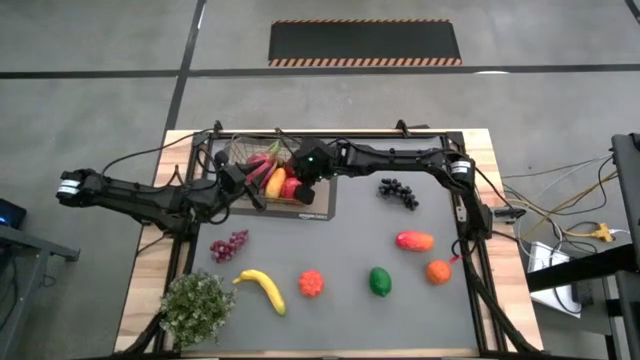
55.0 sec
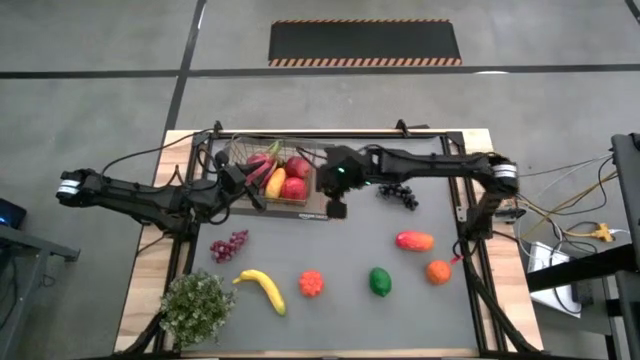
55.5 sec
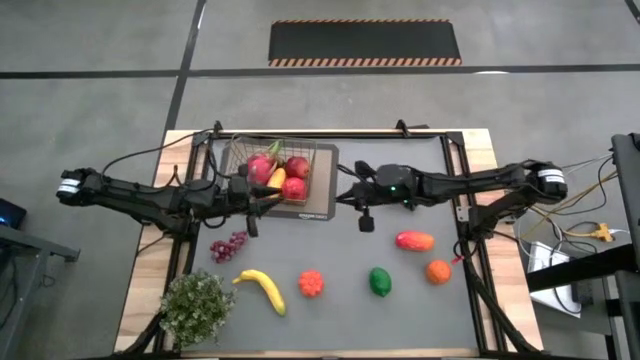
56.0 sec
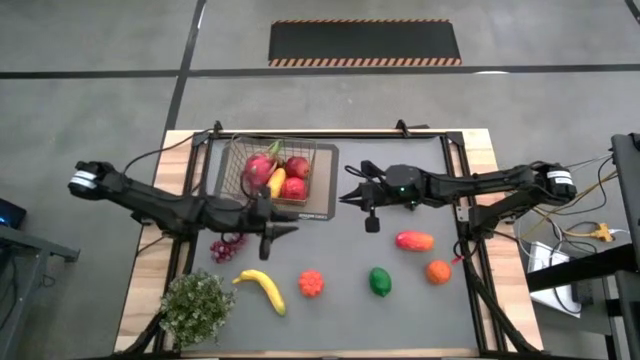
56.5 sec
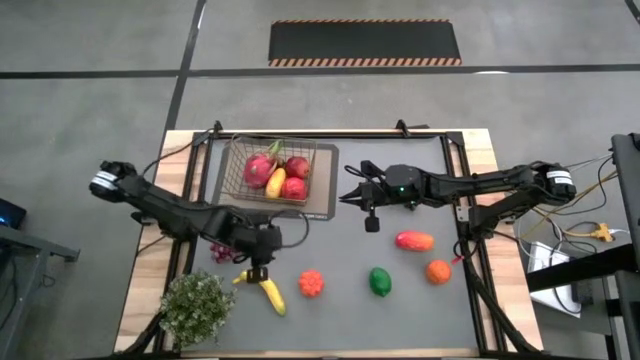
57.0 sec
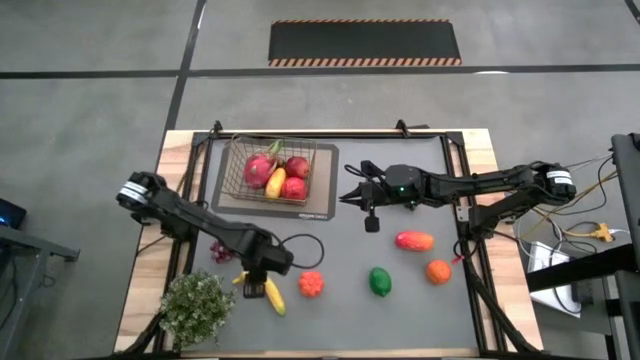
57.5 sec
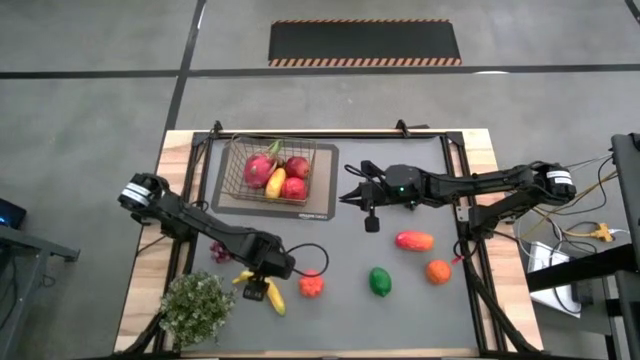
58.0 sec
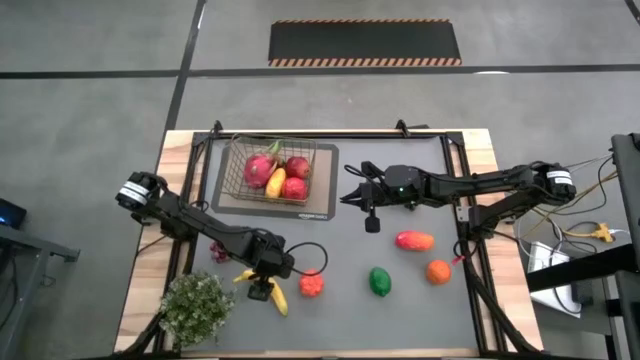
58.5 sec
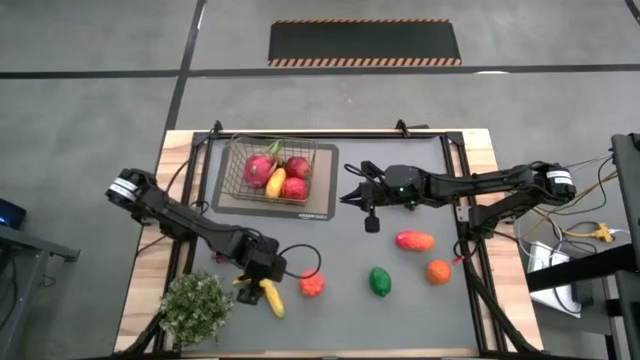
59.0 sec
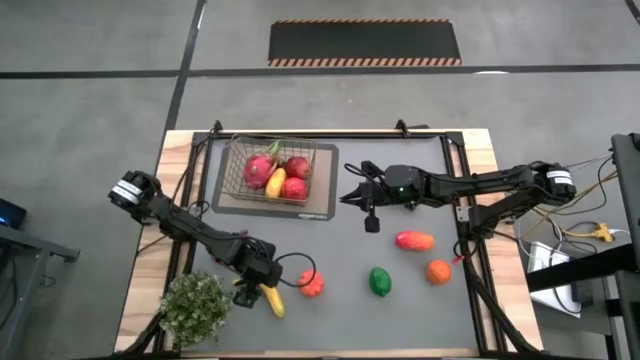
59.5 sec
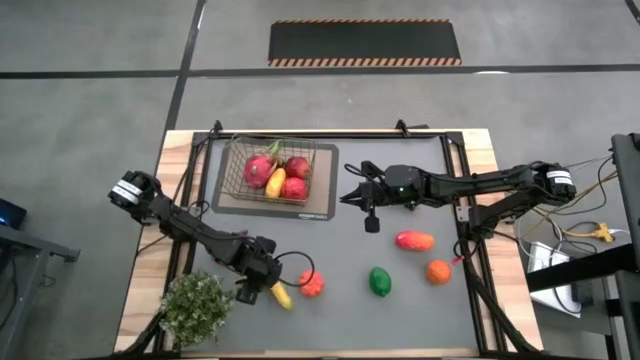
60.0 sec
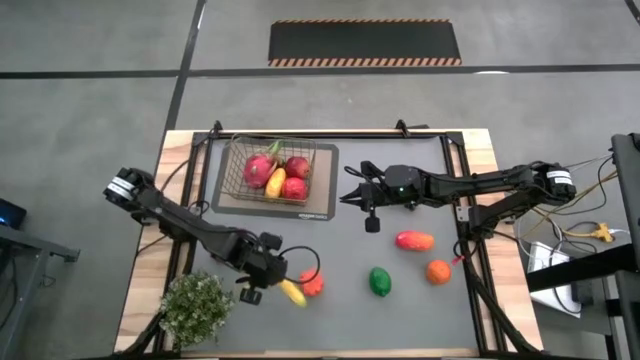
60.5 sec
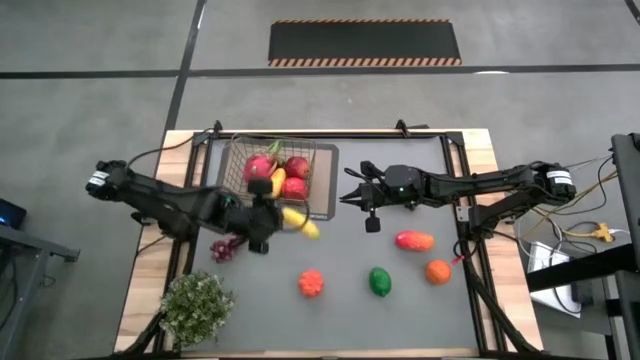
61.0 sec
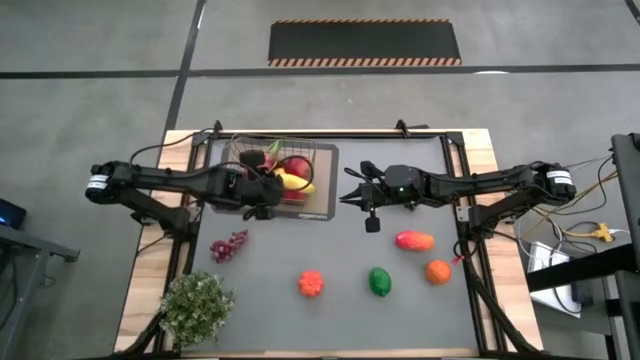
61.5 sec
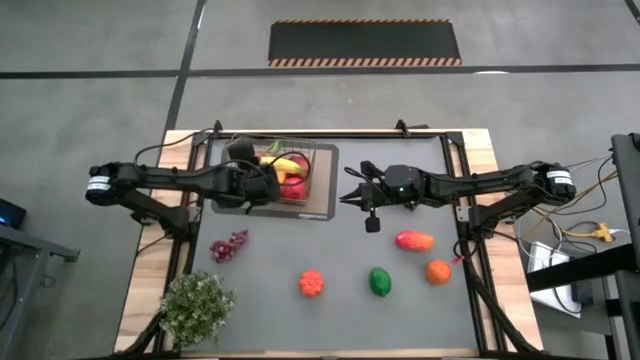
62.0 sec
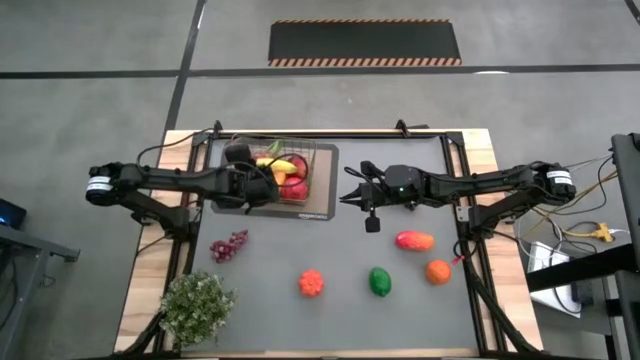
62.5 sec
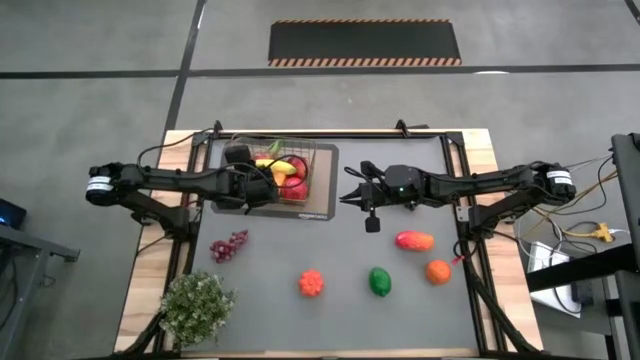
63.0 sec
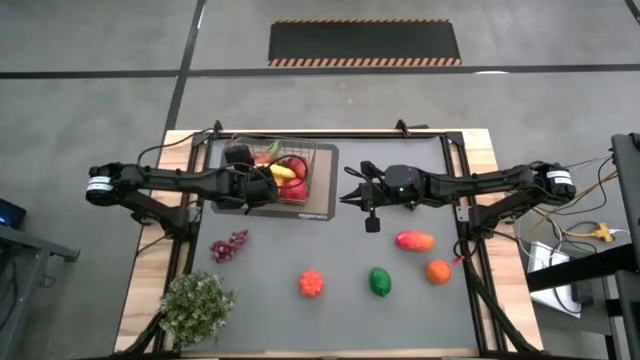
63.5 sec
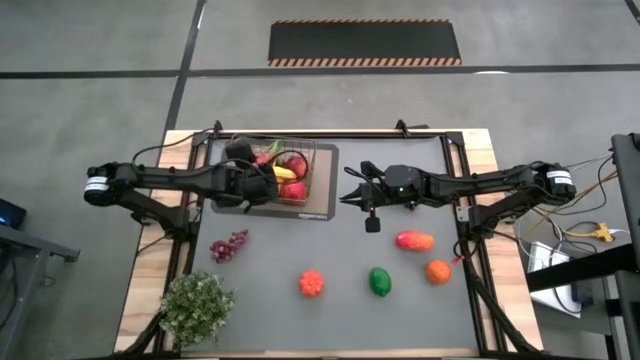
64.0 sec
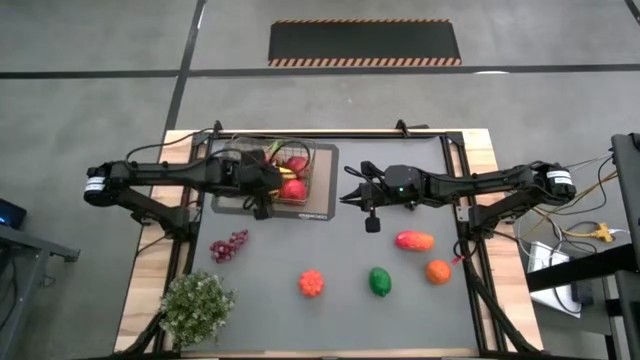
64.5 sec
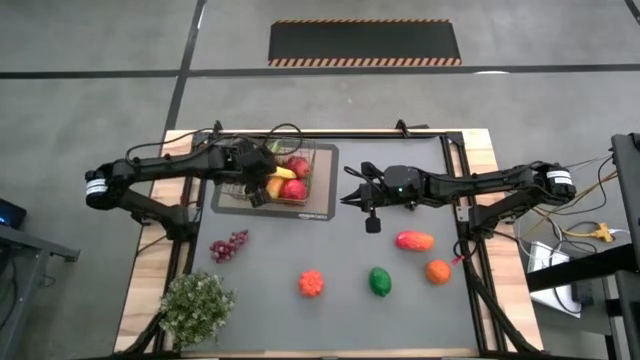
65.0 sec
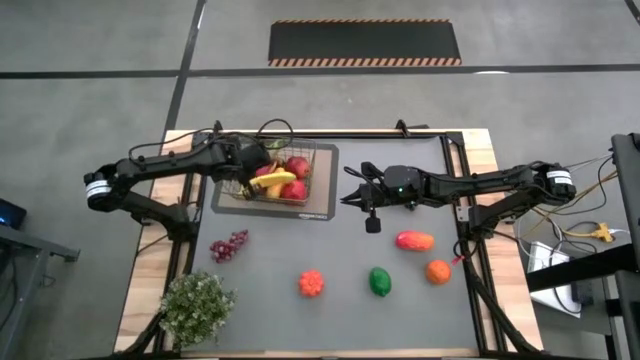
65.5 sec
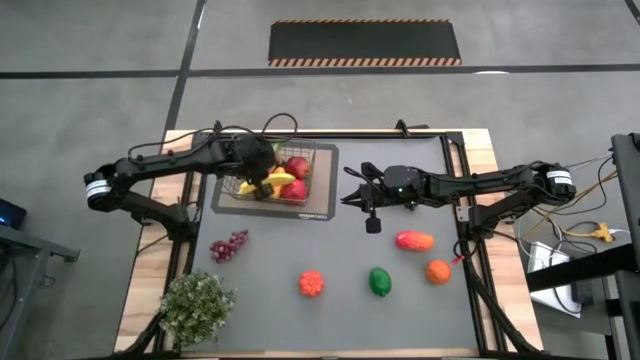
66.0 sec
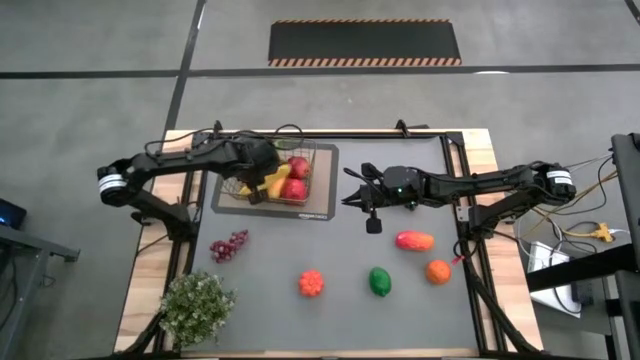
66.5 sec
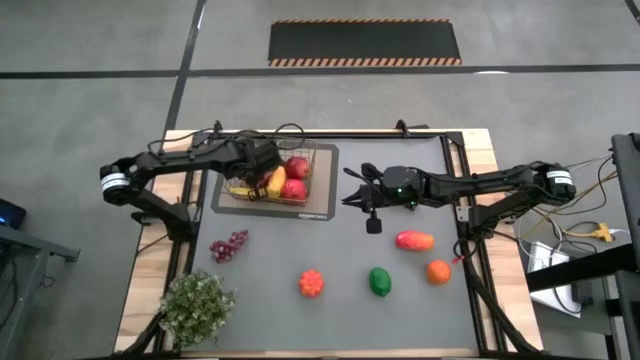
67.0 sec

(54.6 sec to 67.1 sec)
Task: Build produce basket
Put the yellow banana into the wire basket

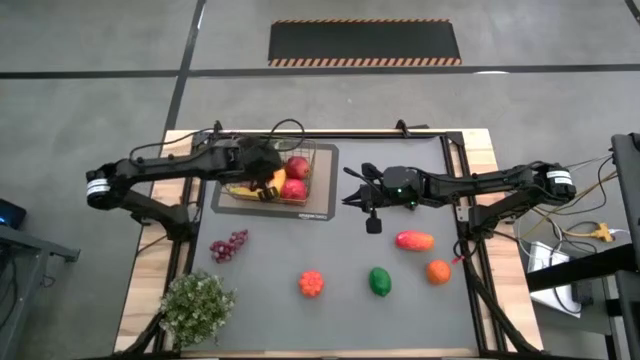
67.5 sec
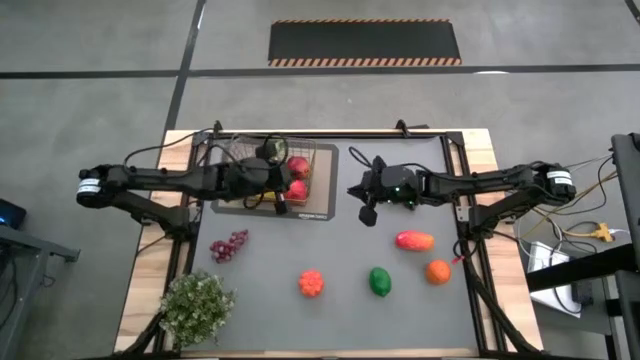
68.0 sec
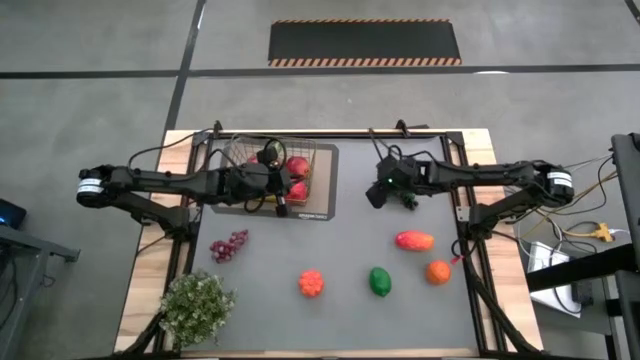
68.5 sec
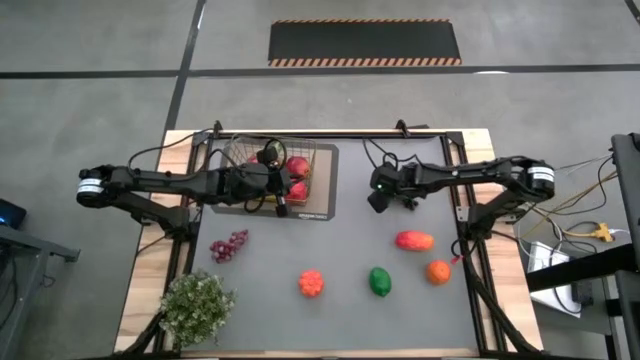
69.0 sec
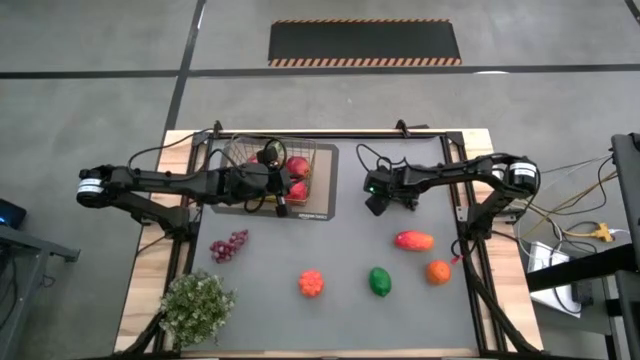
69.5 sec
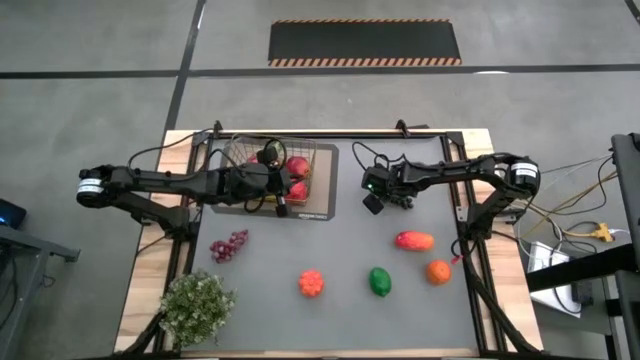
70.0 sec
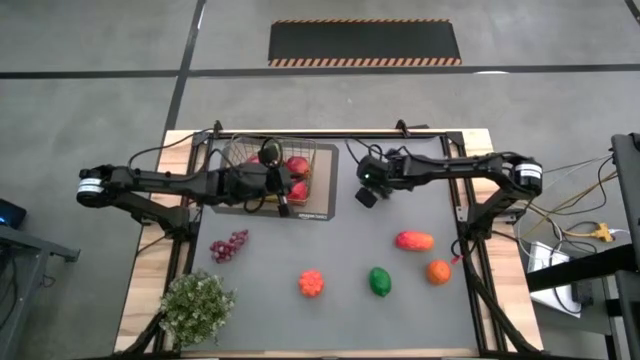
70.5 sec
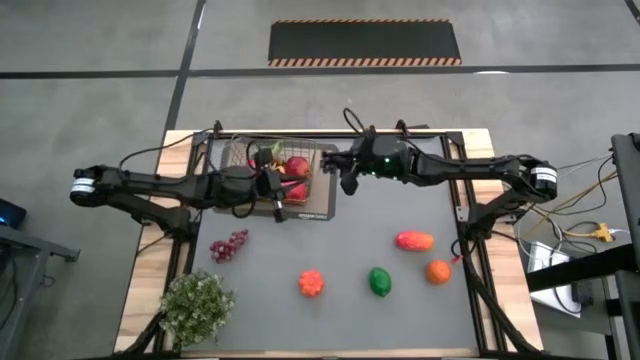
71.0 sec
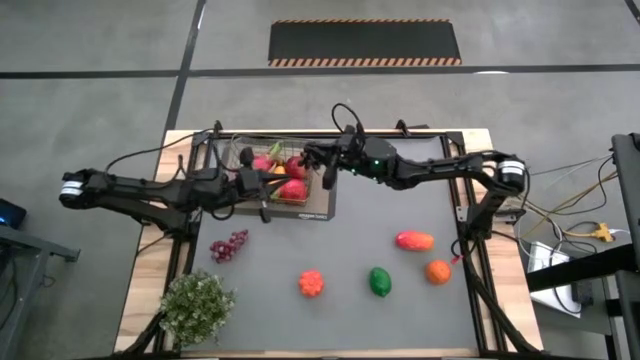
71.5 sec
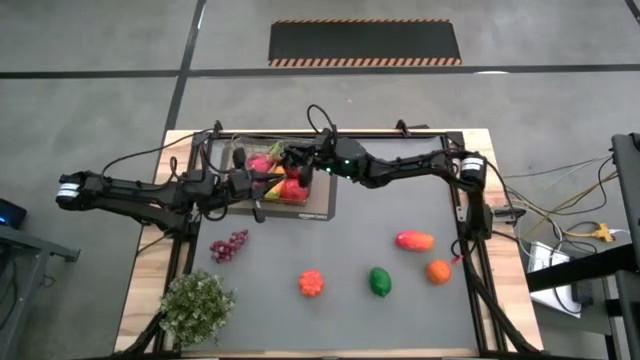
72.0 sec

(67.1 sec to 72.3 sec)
Put the purple grapes into the wire basket

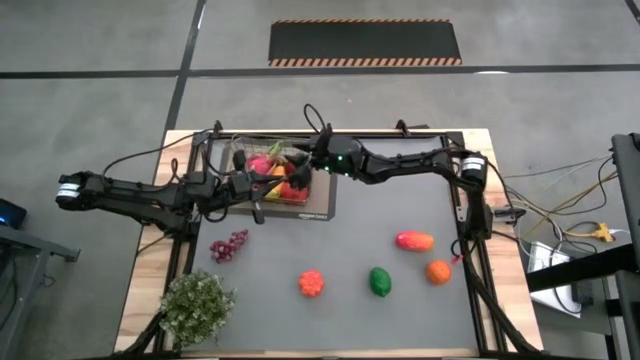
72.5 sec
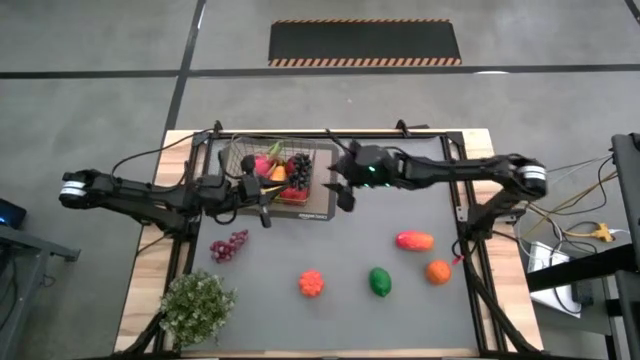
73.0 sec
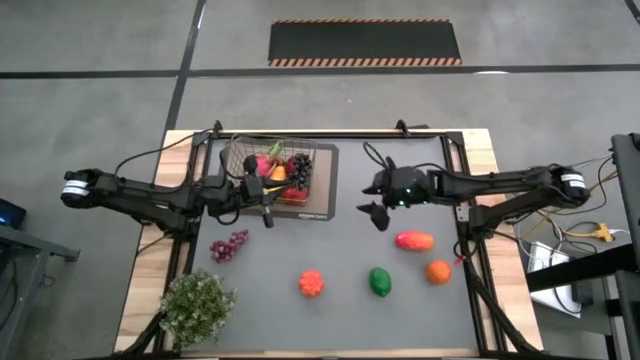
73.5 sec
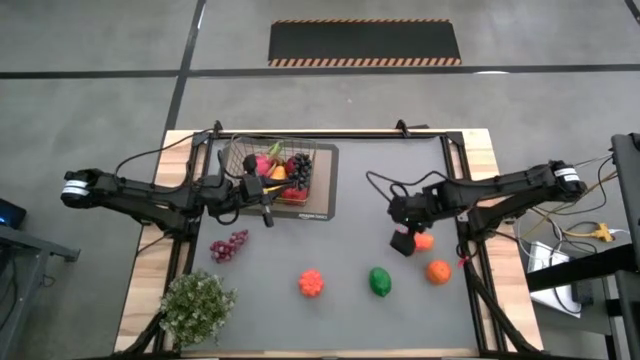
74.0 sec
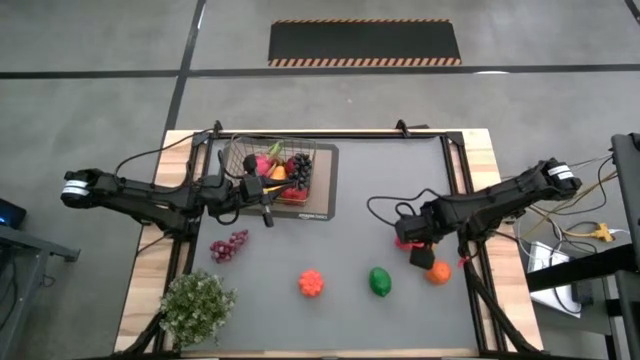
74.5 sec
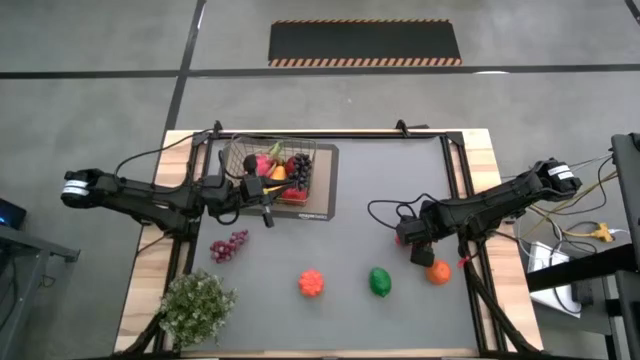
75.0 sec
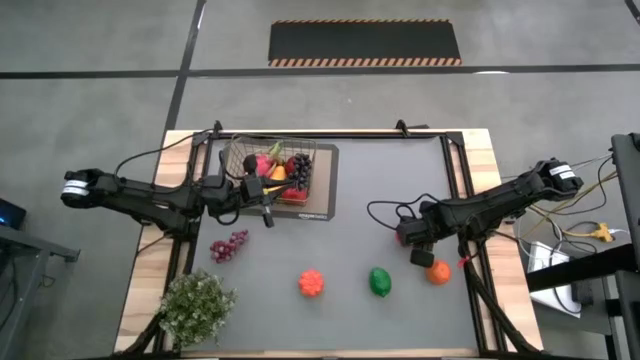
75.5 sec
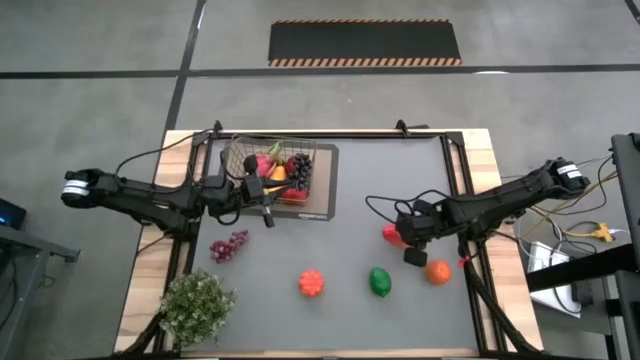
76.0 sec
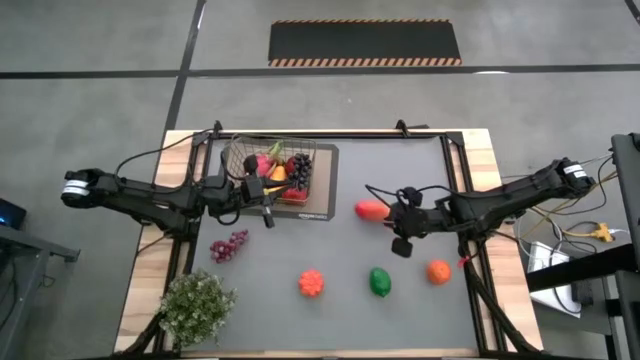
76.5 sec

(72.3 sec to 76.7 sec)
Put the orange mango into the wire basket
